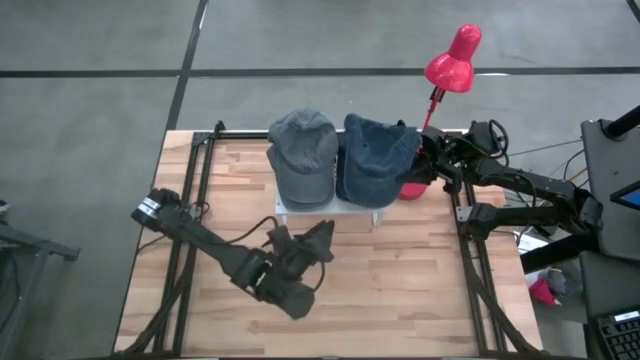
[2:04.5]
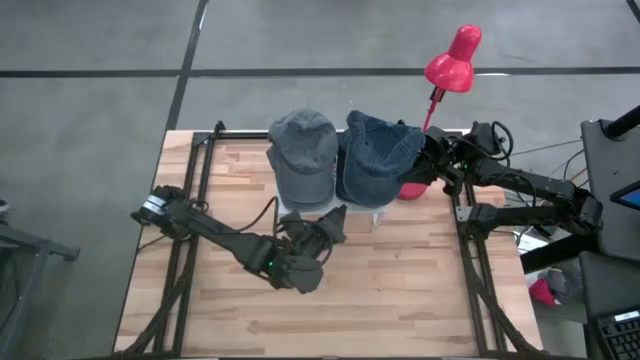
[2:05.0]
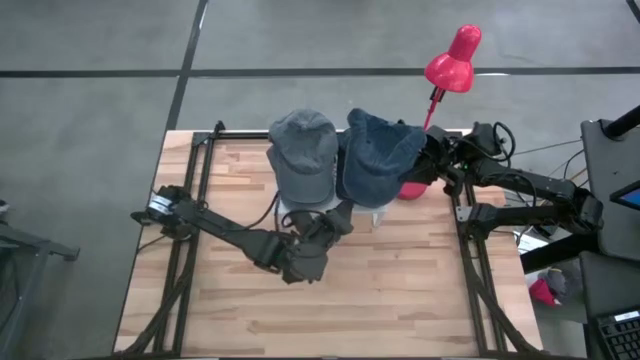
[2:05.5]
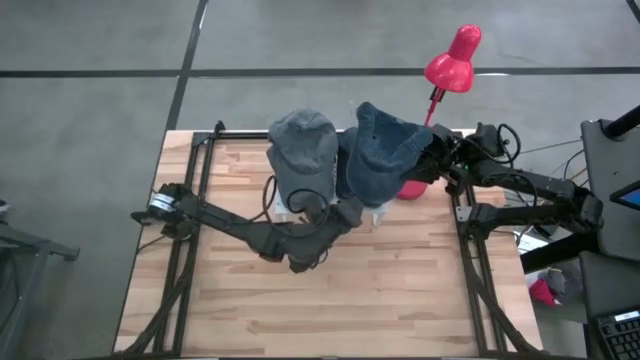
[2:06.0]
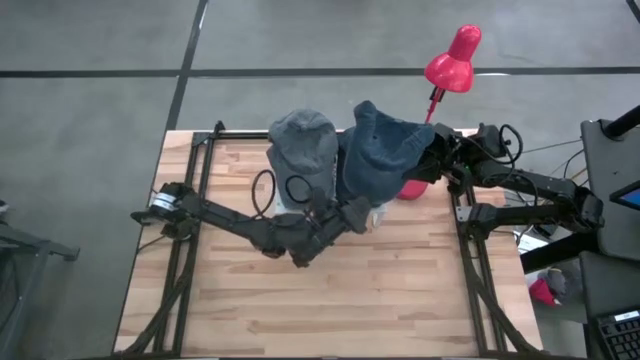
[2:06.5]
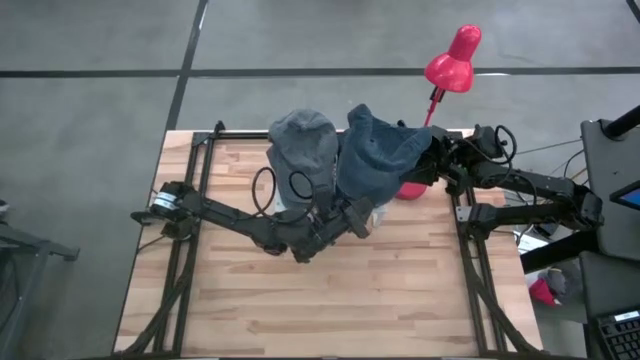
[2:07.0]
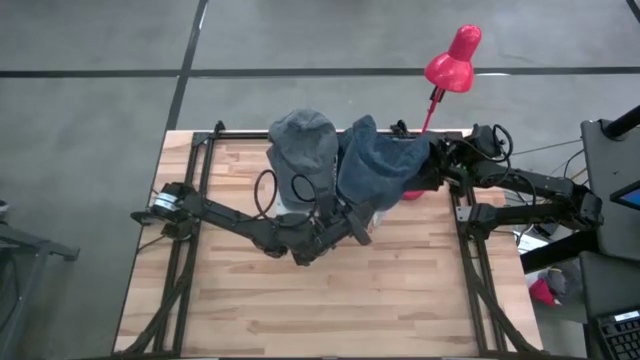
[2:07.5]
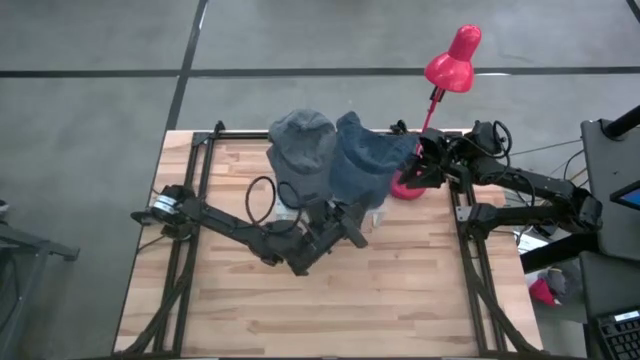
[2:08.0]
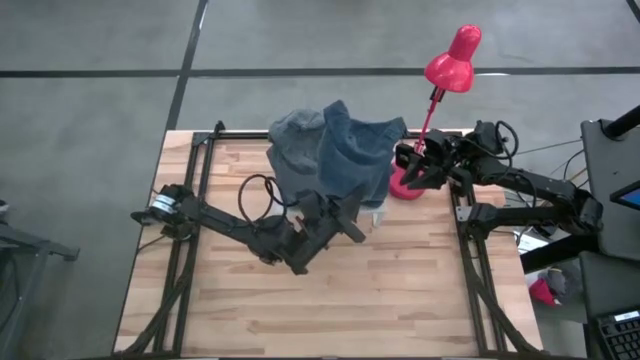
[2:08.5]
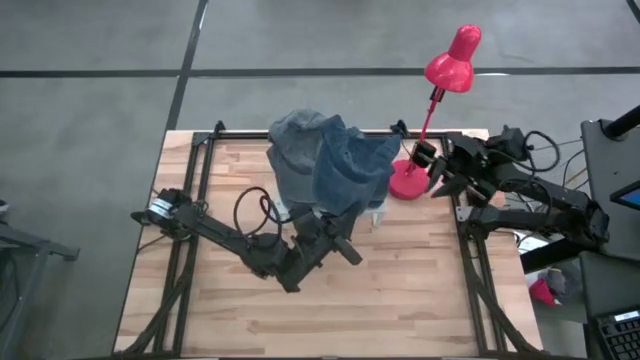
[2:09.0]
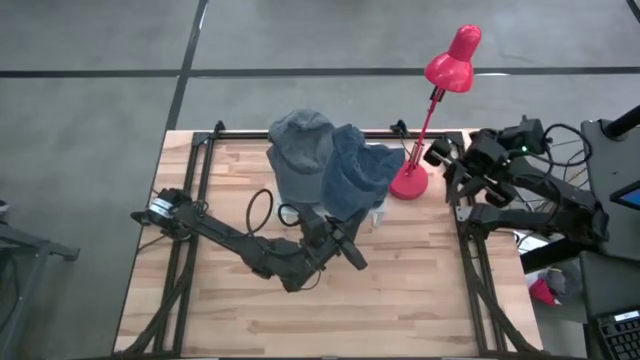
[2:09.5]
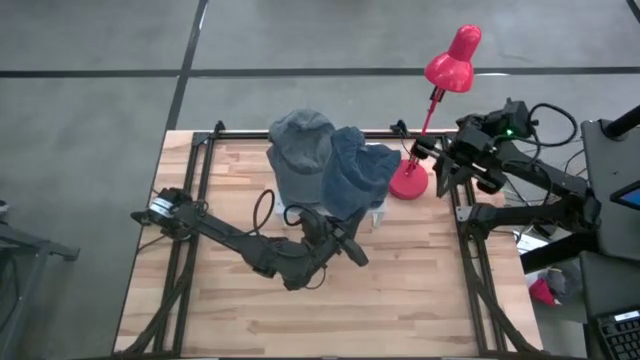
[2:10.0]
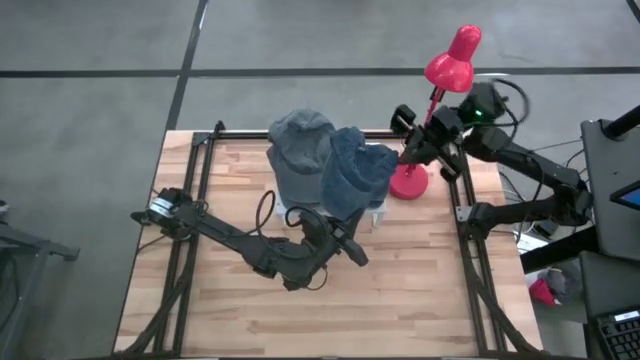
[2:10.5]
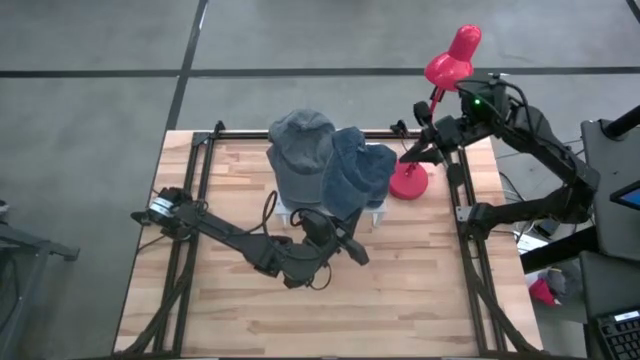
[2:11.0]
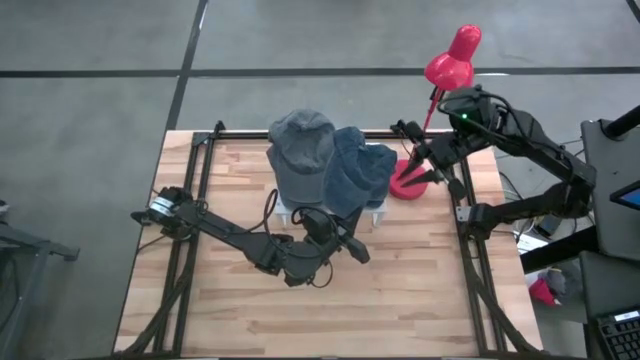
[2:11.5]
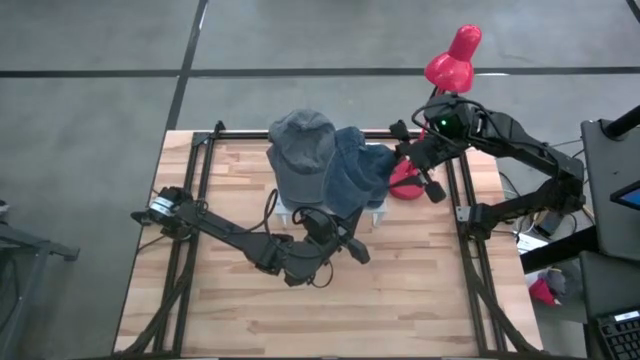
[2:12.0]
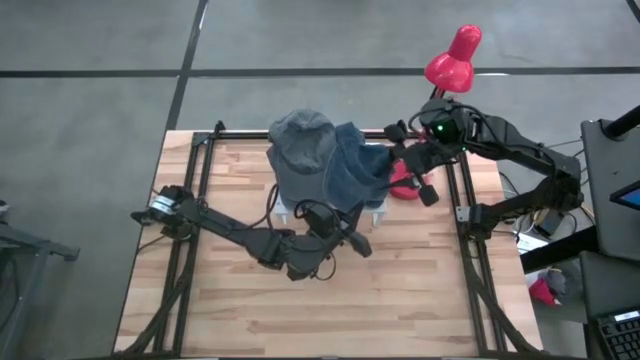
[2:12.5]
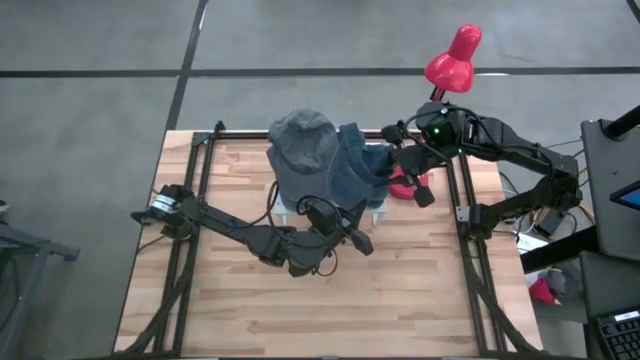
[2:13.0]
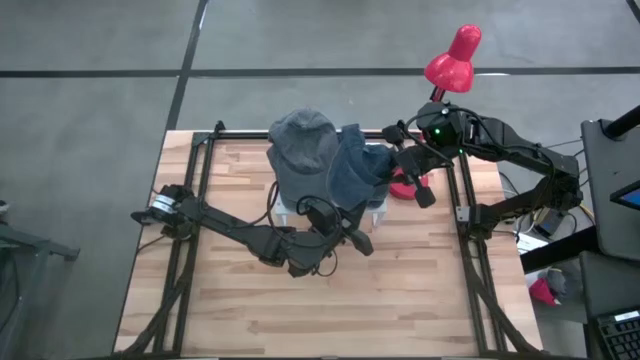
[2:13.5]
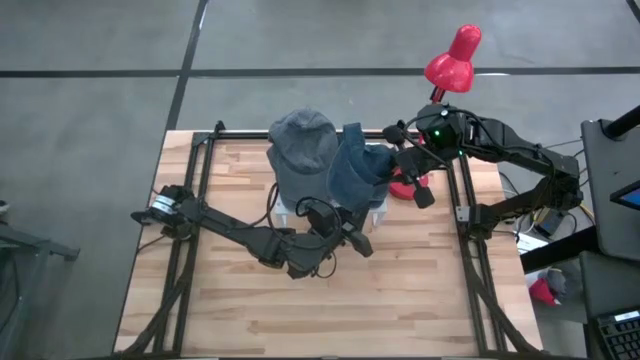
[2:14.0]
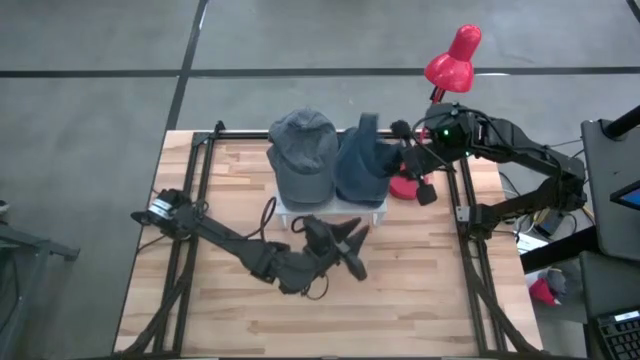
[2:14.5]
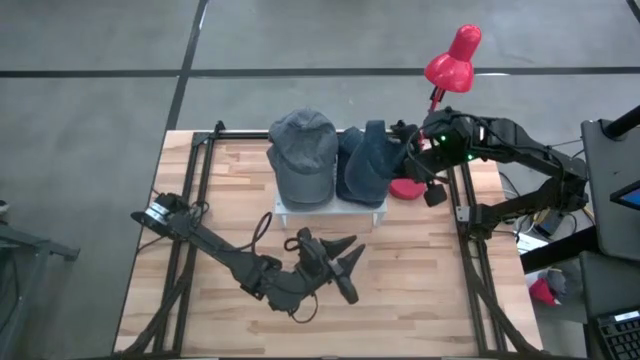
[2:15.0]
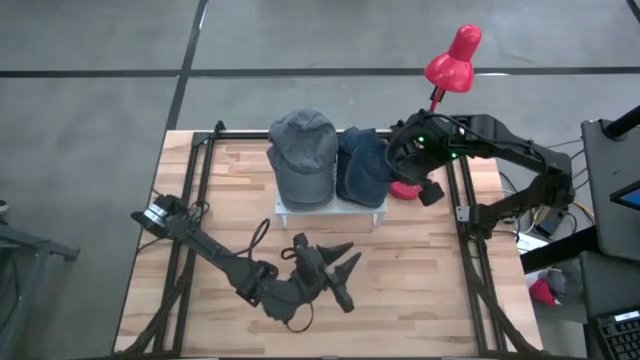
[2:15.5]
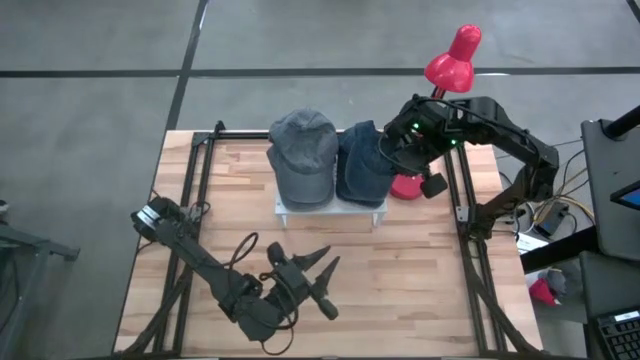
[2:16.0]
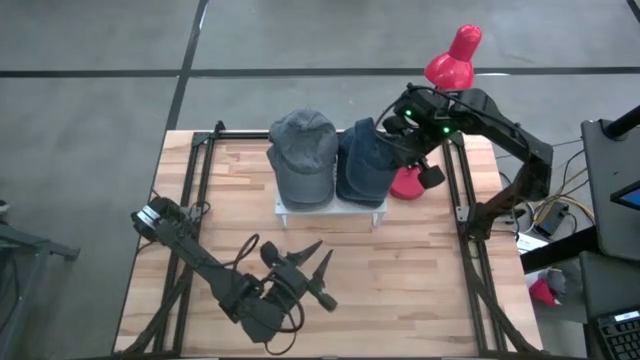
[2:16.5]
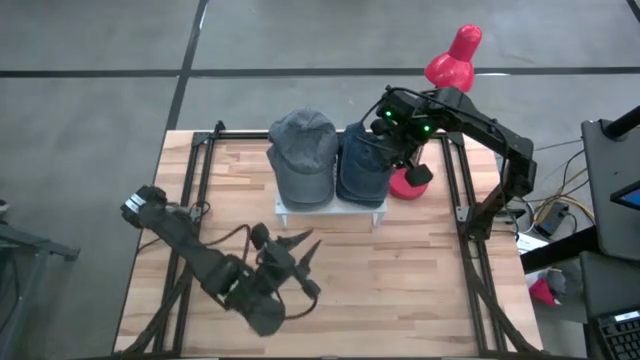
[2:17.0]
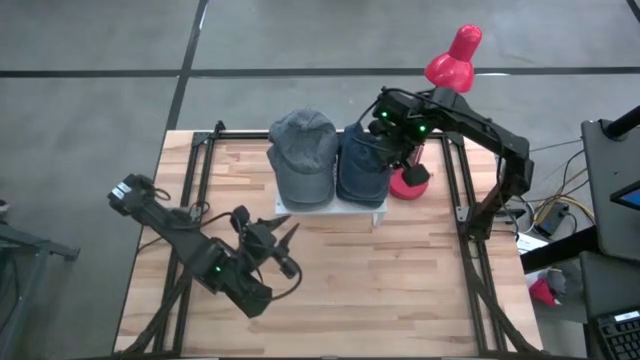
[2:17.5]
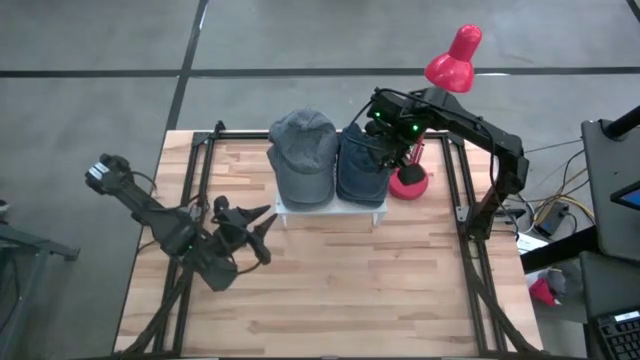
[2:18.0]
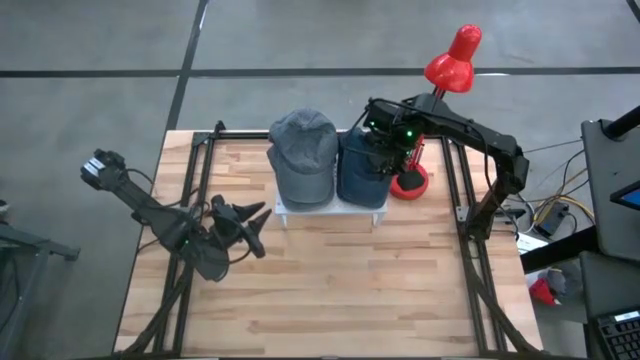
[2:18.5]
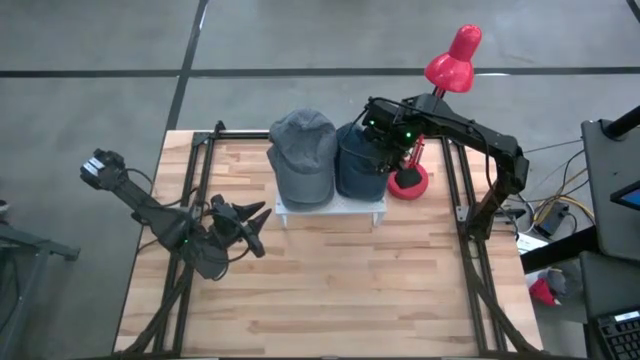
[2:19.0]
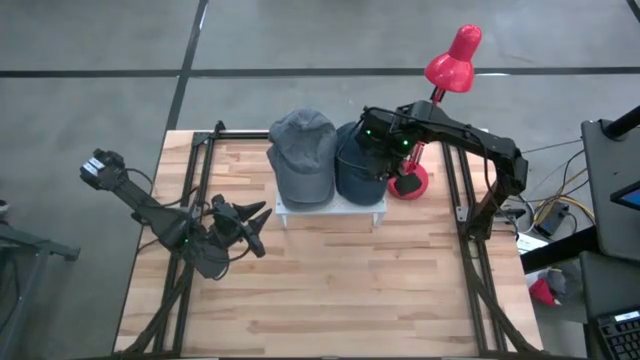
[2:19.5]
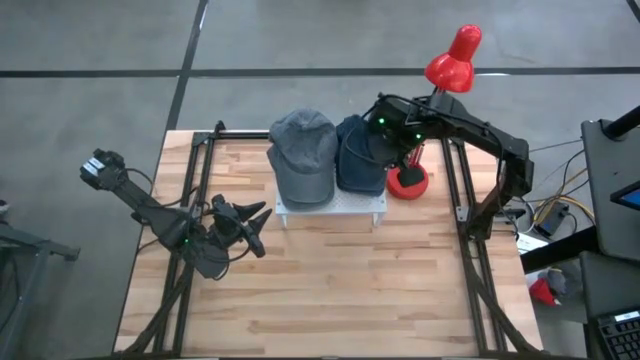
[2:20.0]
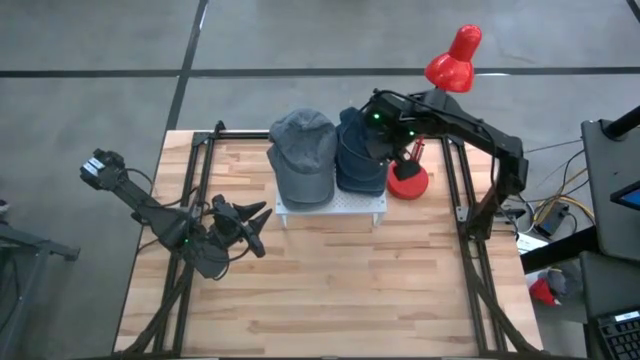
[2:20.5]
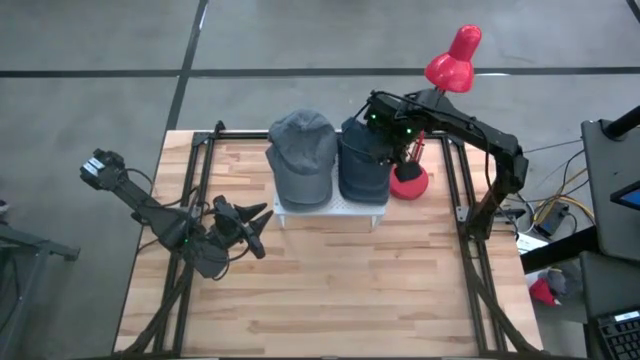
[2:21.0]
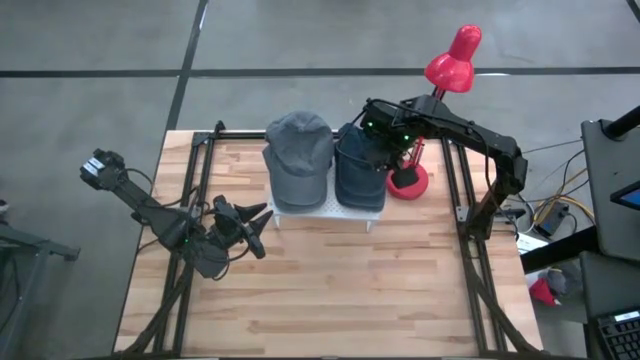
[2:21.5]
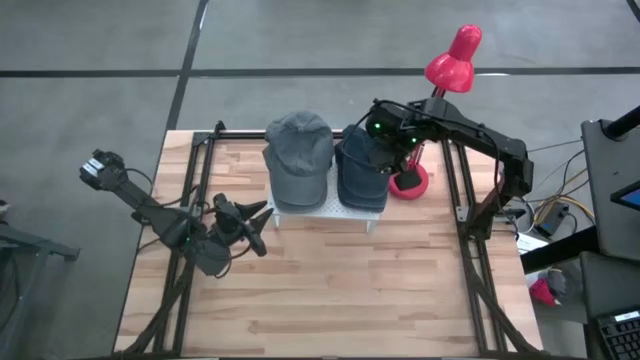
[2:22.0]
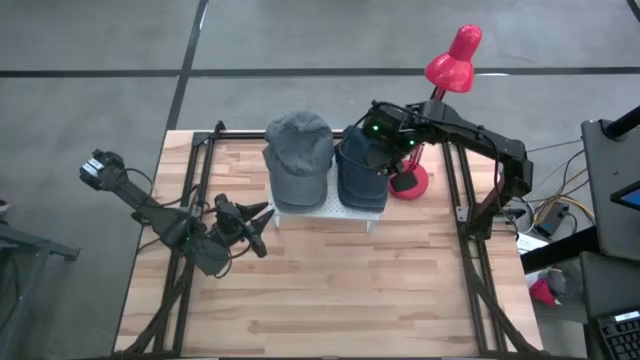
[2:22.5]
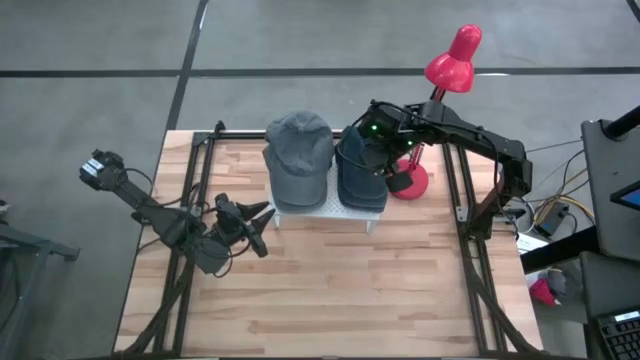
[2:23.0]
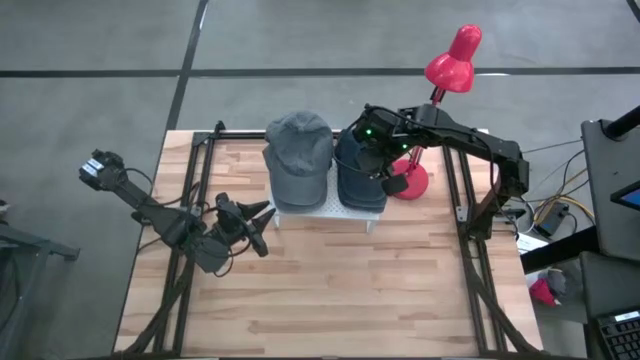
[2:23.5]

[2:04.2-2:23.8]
Task: Pick & Place hat
Stack the blue cap on the blue caps on the shelf

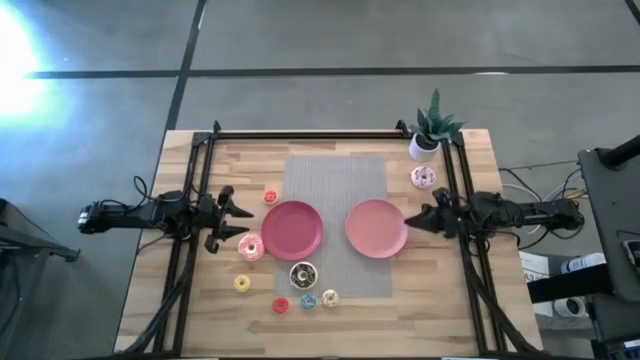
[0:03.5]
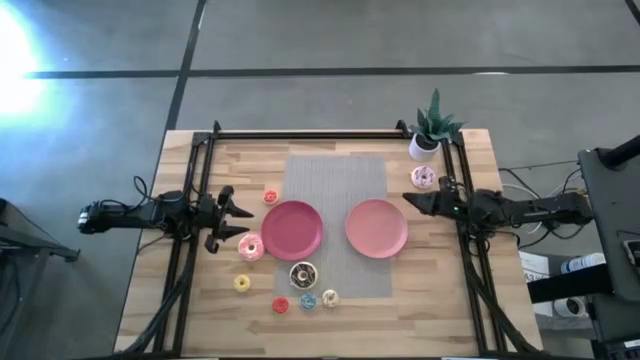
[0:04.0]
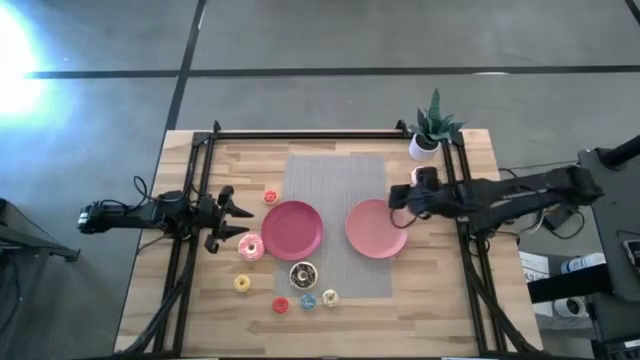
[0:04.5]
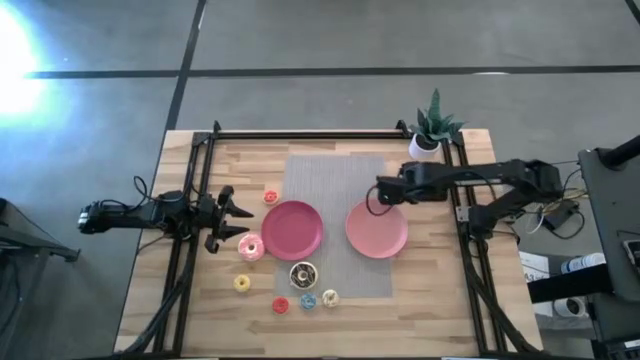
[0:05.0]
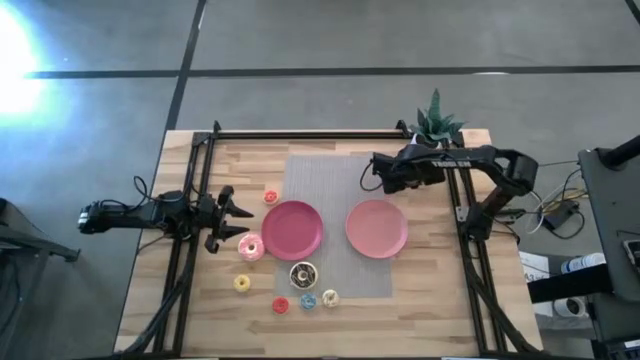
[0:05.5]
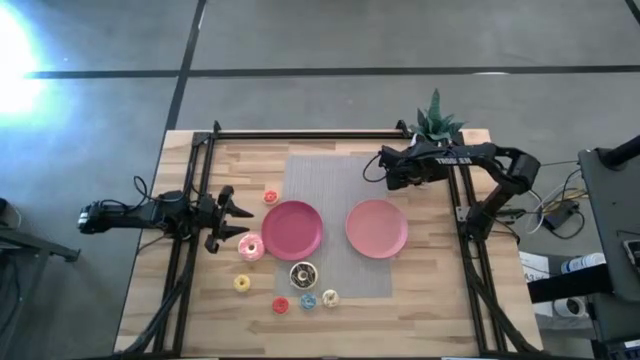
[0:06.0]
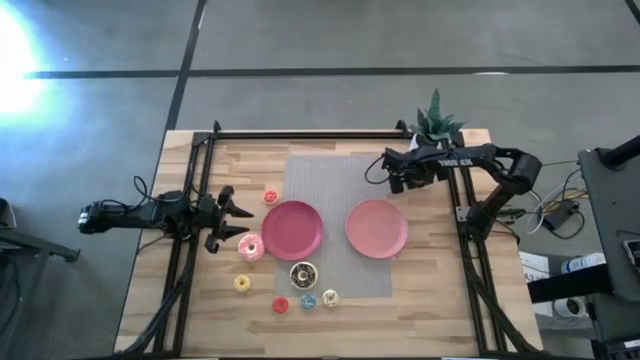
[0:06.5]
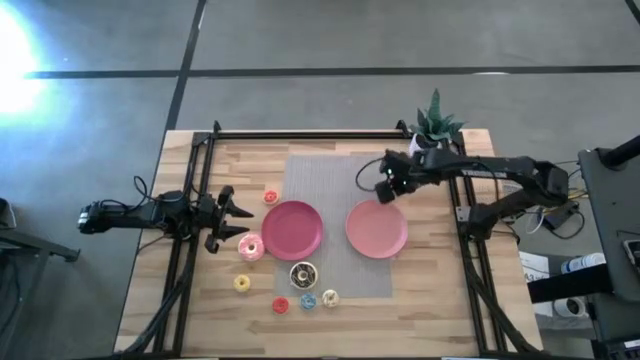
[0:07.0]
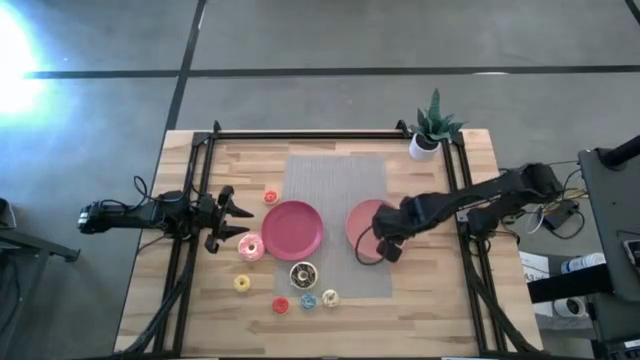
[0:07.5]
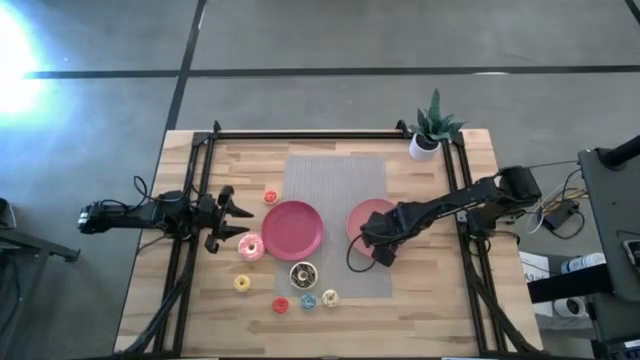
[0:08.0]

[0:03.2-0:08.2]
Task: Pick & Place donuts
Put the large purple doughnut on the light pink plate
